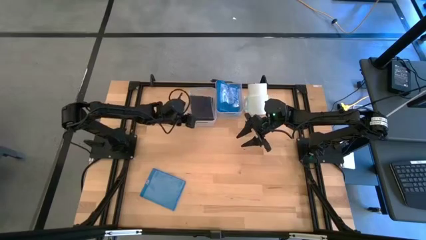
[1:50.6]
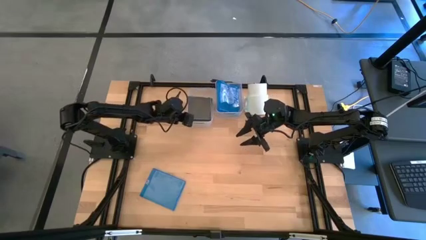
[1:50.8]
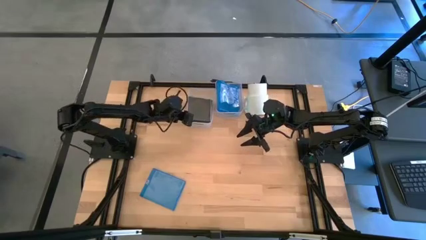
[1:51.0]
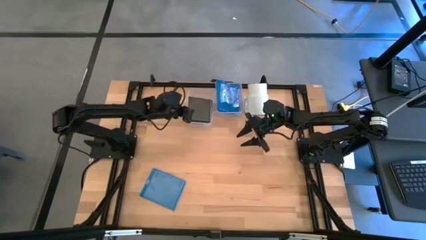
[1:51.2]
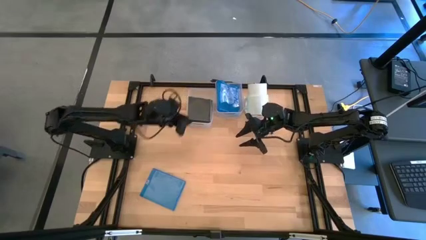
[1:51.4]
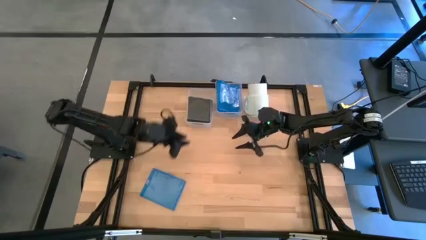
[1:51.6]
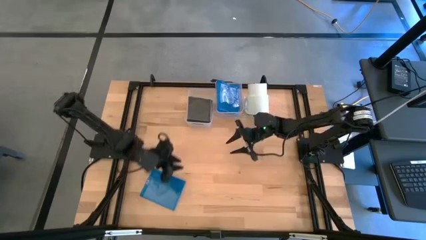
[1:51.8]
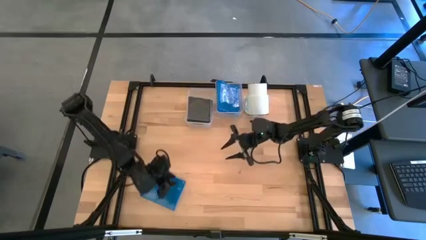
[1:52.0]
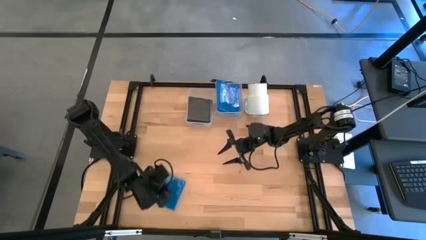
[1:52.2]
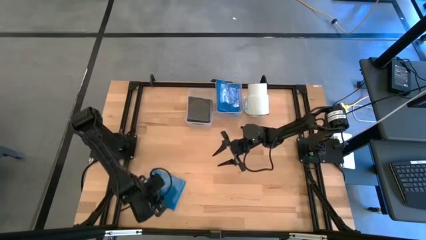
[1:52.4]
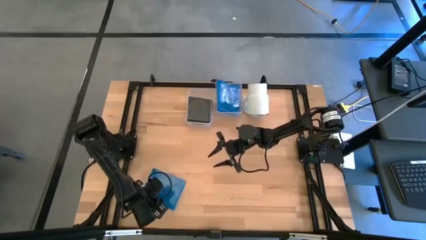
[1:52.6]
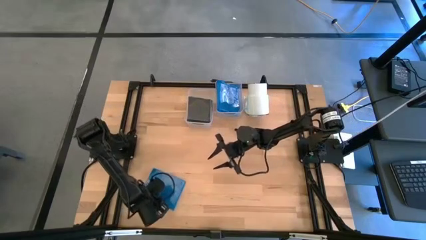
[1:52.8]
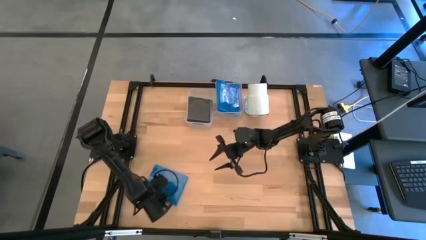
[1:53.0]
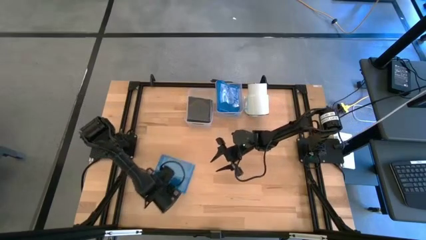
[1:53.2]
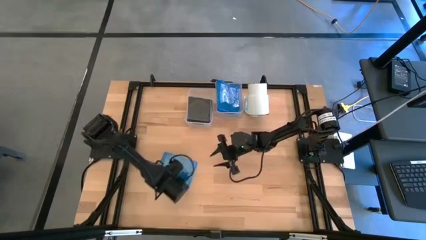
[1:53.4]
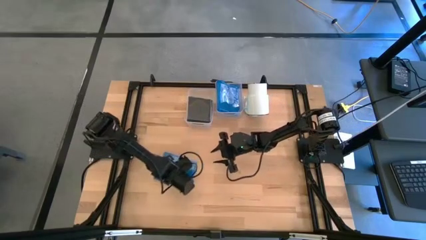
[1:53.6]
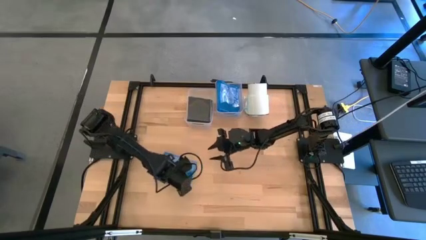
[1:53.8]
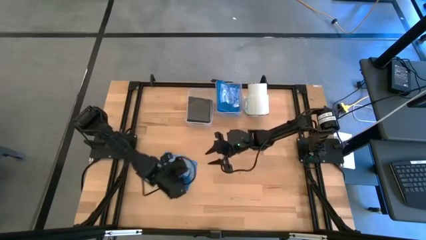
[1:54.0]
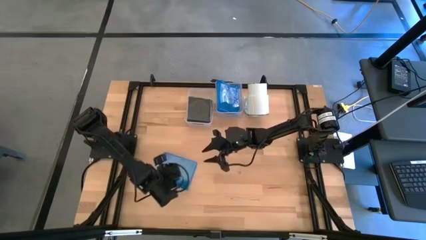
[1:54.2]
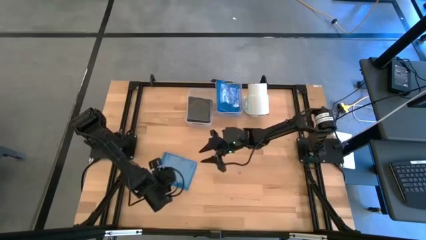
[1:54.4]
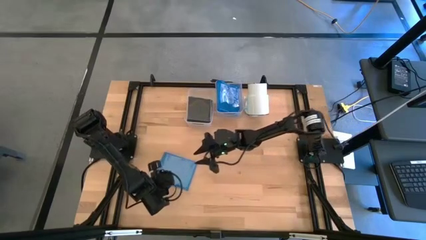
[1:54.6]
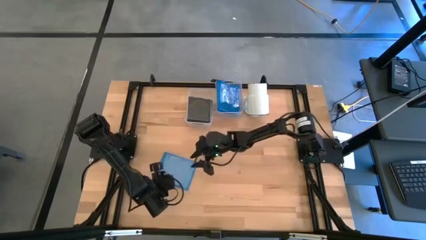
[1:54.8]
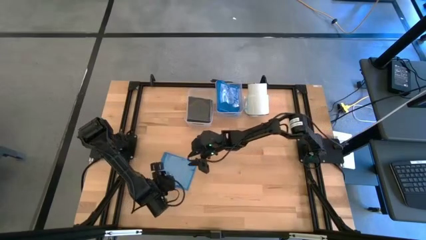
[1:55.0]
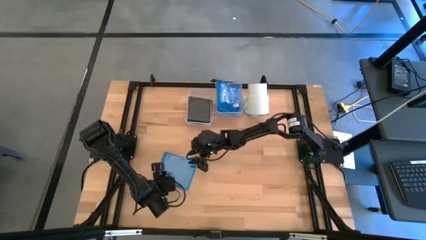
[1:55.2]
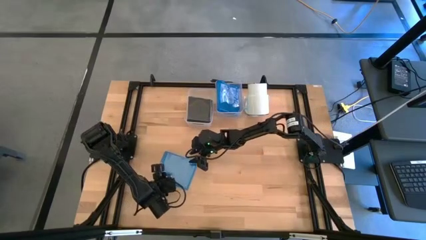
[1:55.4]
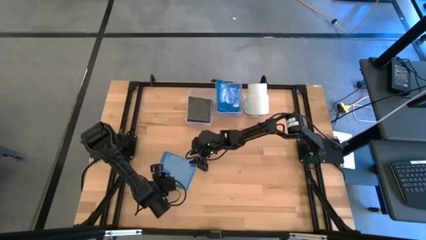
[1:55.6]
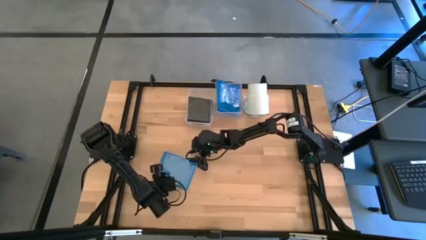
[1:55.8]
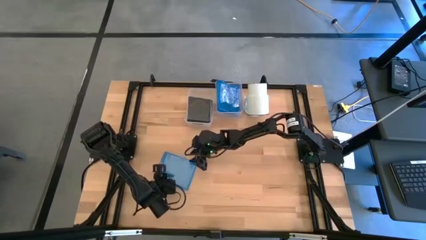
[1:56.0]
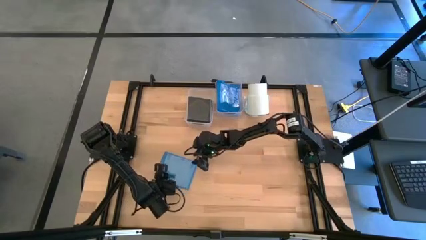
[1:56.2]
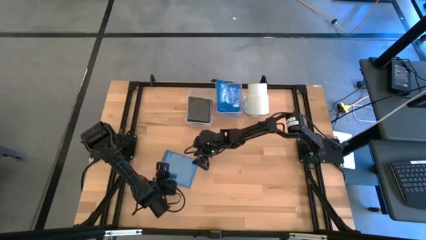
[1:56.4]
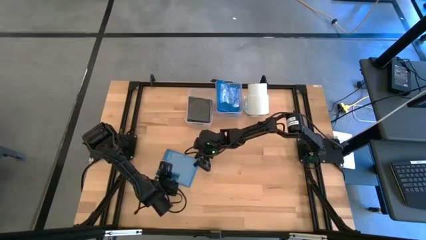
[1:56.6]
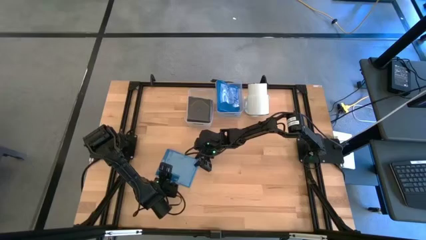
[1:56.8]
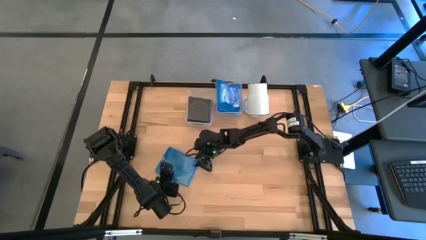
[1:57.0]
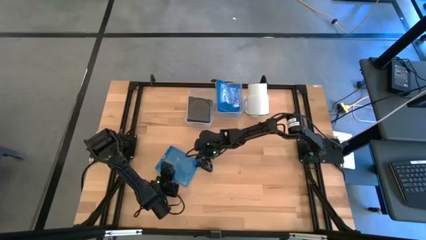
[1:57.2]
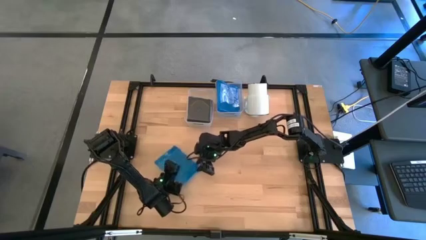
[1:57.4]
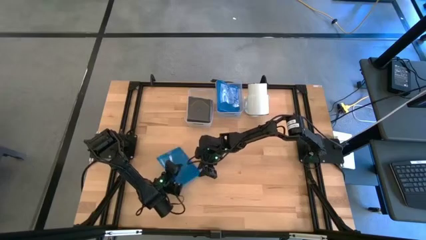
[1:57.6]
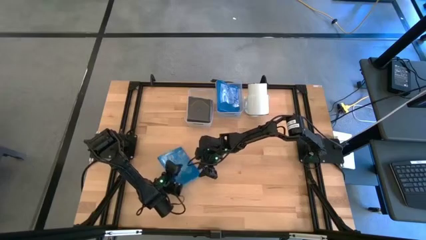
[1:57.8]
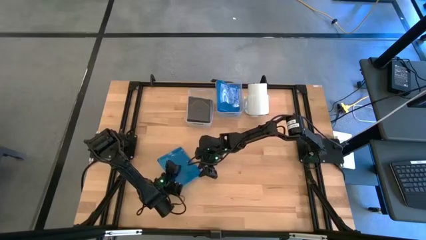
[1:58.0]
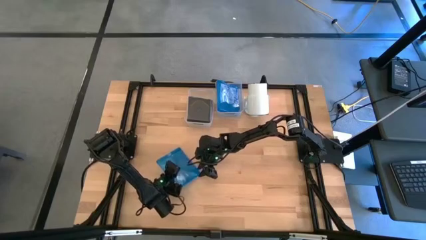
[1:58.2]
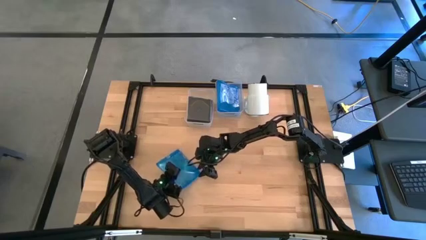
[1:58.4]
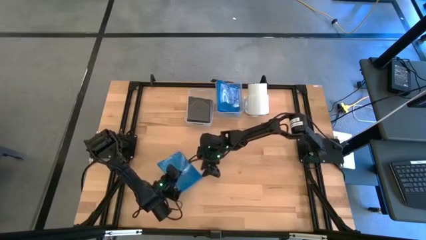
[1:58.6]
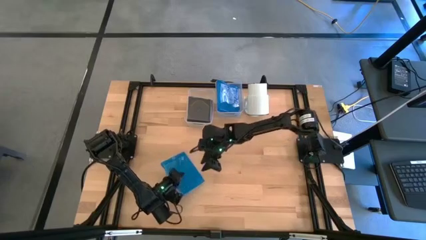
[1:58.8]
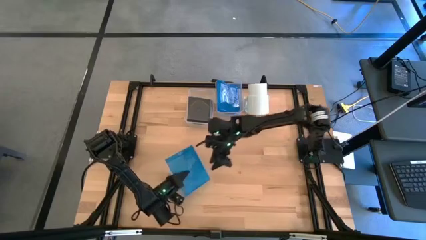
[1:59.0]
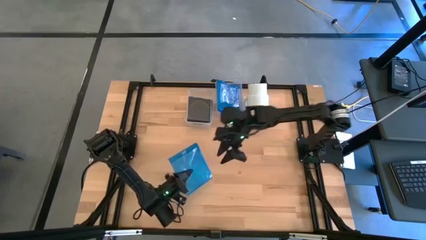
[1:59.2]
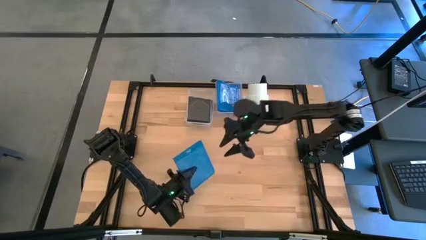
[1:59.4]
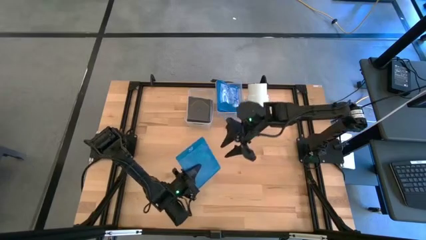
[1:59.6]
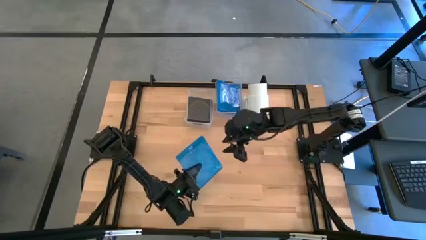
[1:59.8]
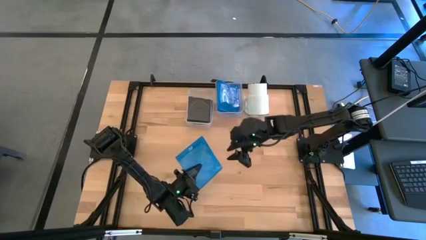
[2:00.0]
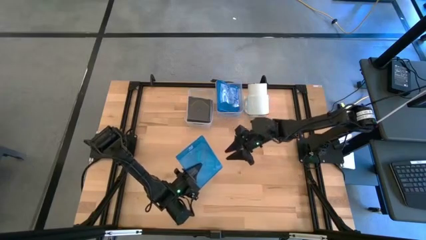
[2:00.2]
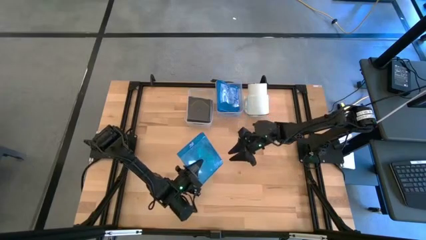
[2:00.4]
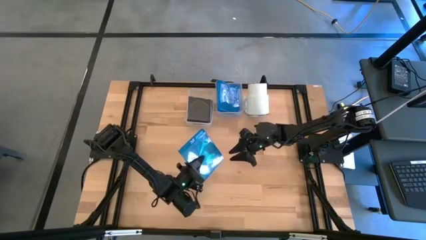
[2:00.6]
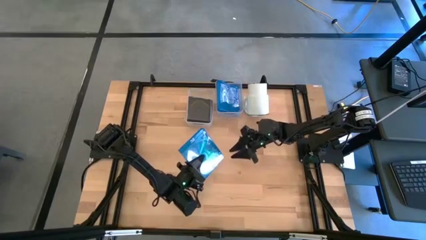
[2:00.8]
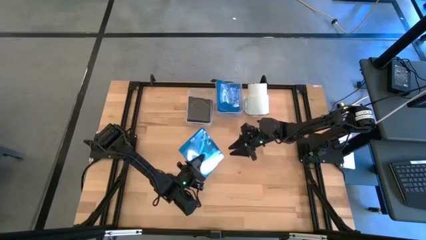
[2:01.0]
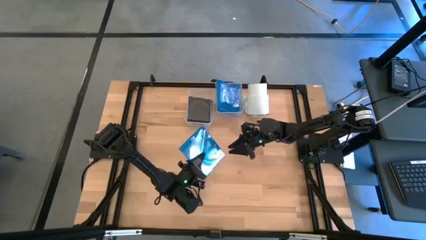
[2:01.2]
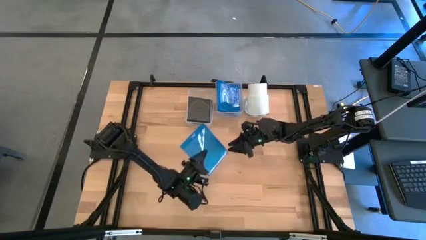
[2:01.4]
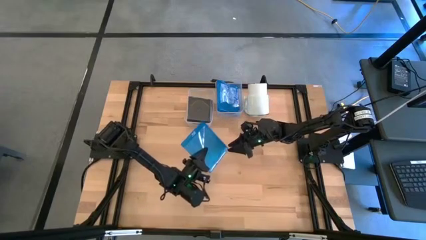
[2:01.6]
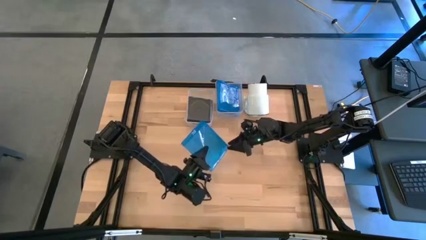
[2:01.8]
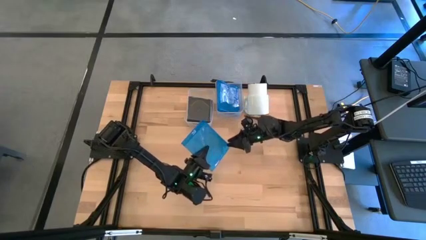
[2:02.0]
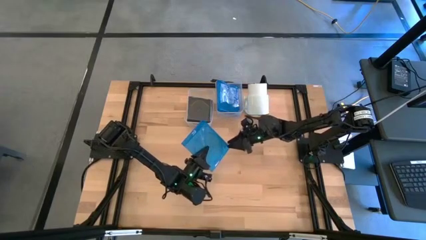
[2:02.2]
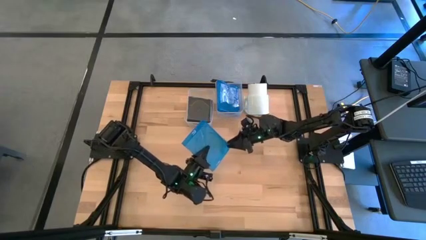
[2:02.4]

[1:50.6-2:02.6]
Task: Pick & place jewel cases by type
Put the blue CD Case into the right transparent bin

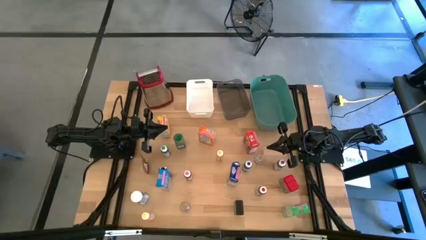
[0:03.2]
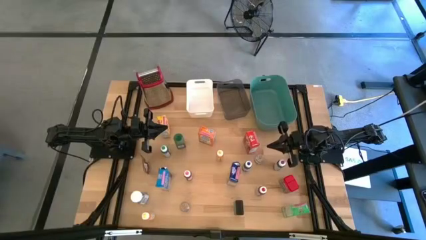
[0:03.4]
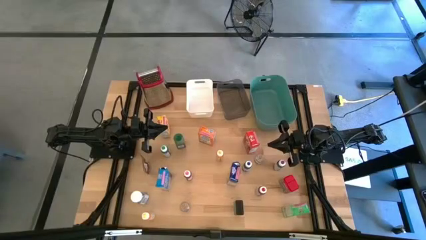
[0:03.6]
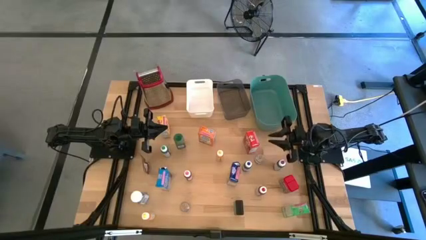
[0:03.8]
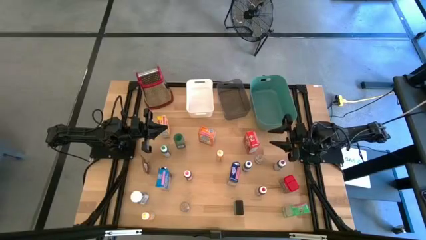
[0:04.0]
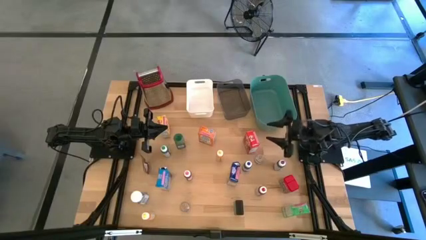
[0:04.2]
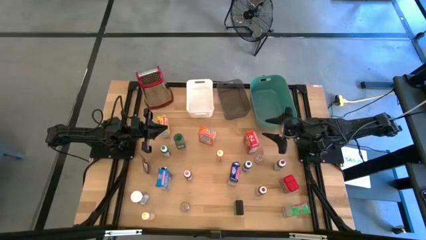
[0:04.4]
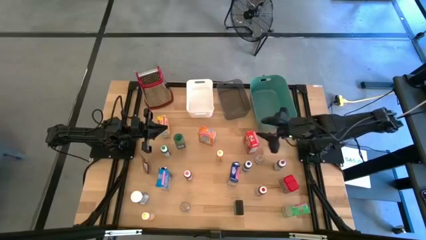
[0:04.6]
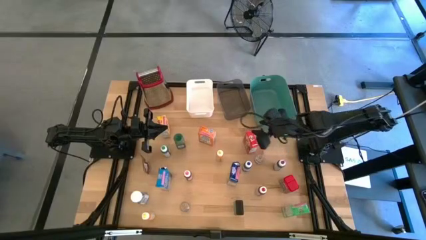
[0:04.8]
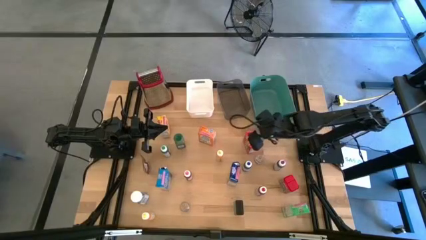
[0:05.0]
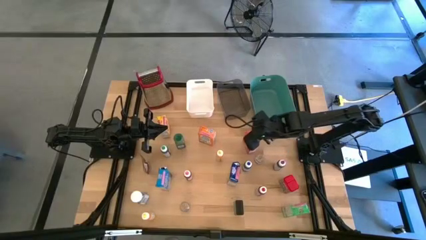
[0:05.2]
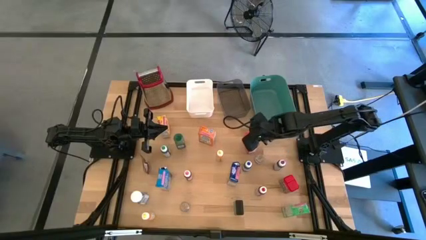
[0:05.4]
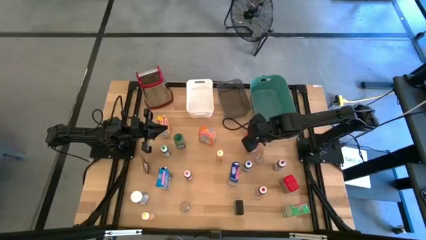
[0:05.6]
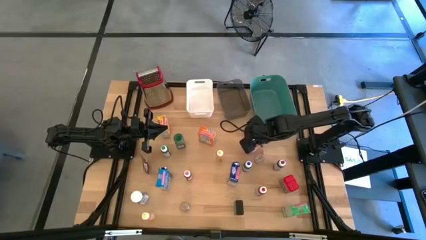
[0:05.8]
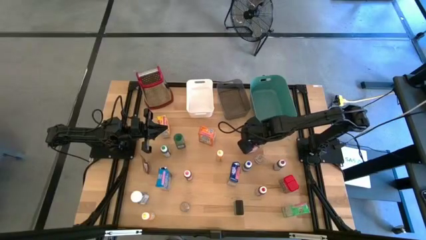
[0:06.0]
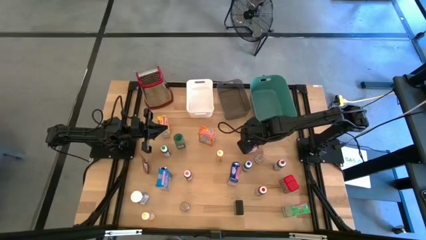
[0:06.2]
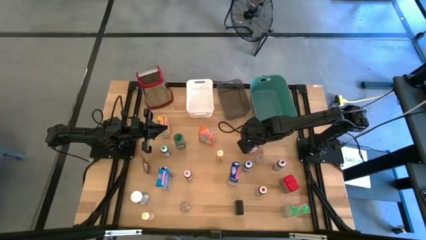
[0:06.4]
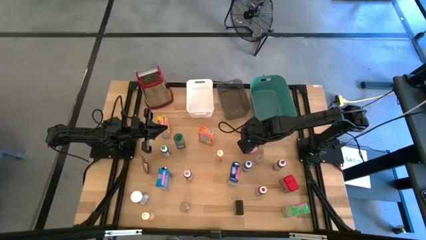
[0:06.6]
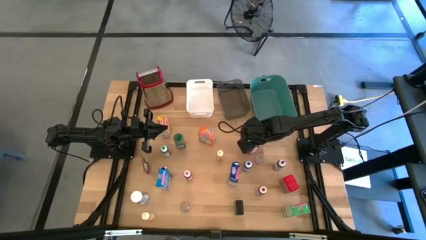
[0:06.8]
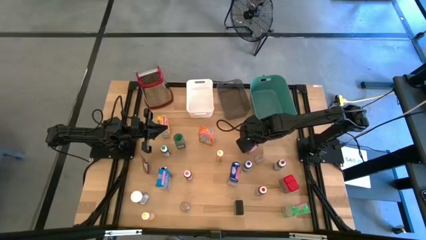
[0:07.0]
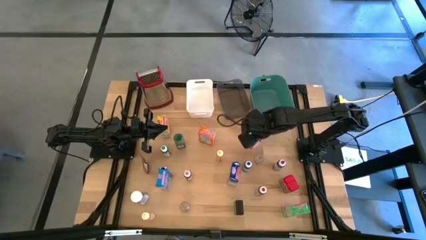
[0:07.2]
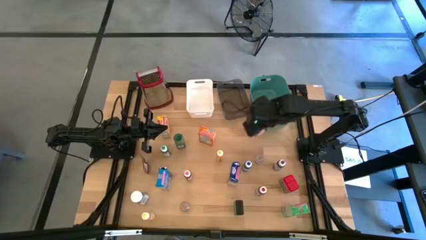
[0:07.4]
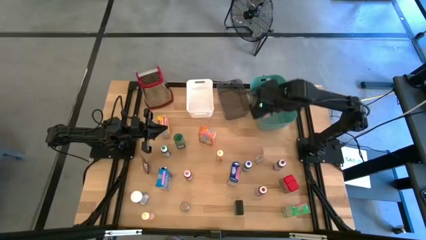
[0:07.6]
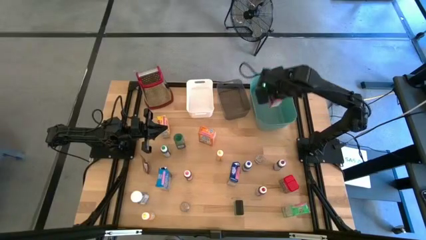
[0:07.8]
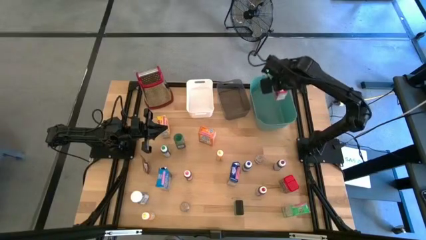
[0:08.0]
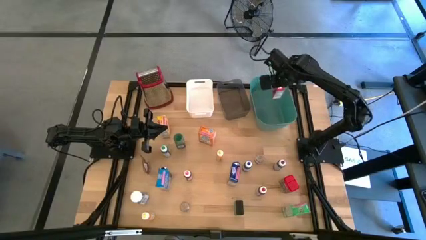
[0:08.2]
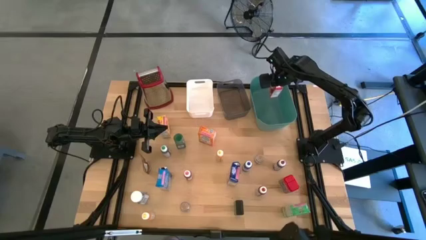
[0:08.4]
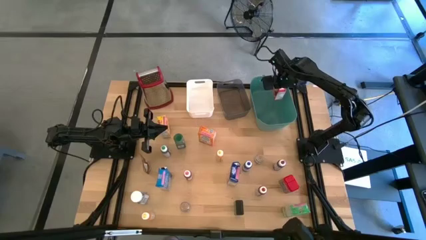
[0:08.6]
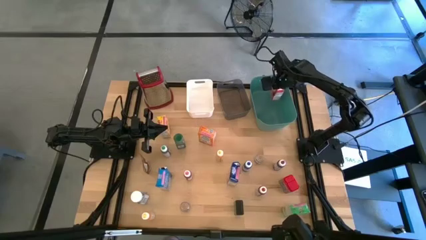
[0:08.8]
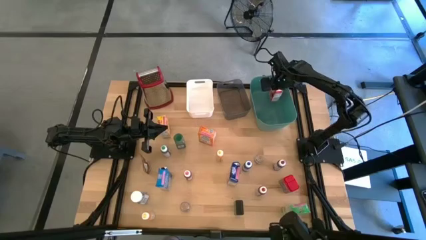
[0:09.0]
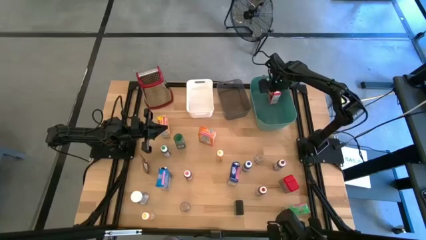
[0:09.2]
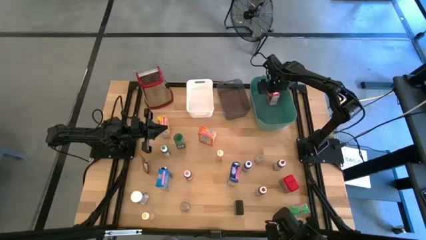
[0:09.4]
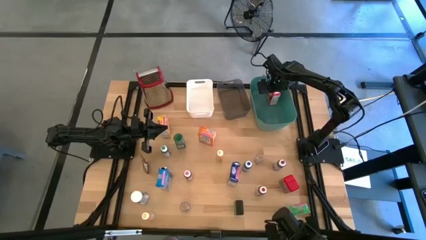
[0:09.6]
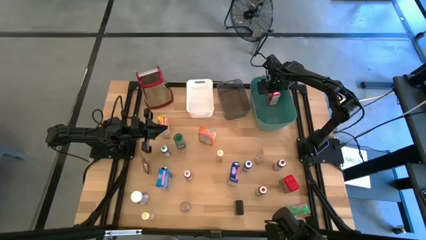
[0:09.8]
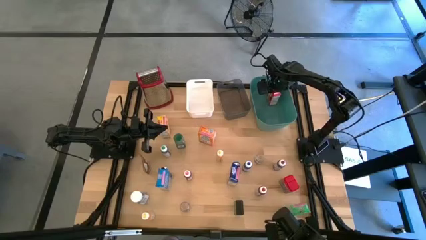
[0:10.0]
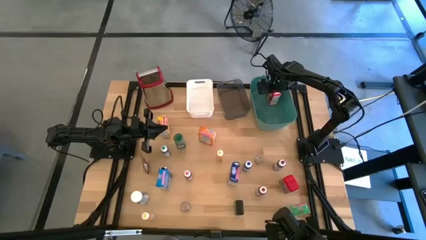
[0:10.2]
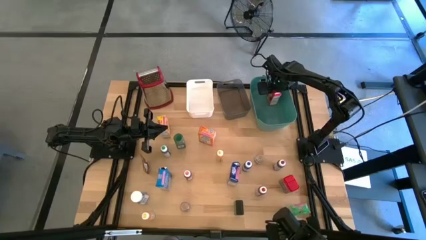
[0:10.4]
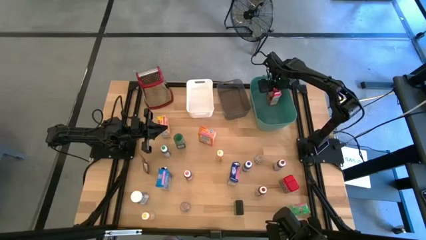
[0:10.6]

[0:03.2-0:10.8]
Task: Pick & Place Kitchen Items
Put the red cereal box into the green bin
